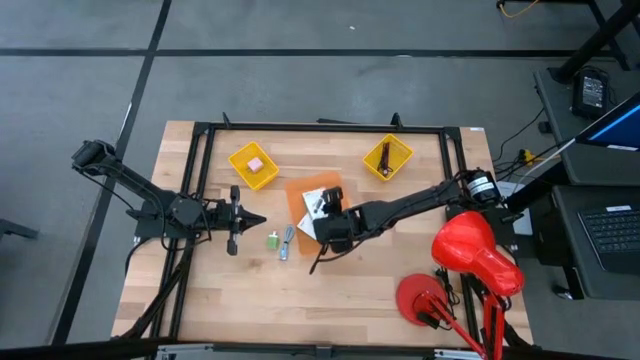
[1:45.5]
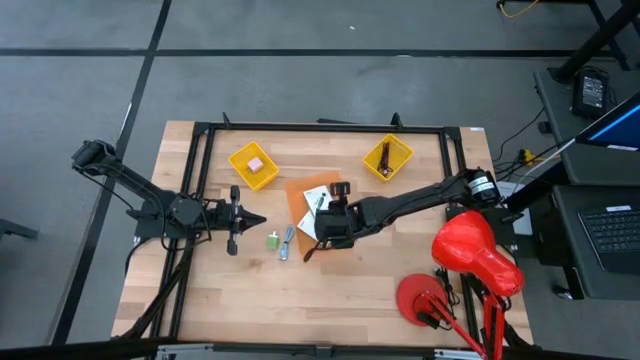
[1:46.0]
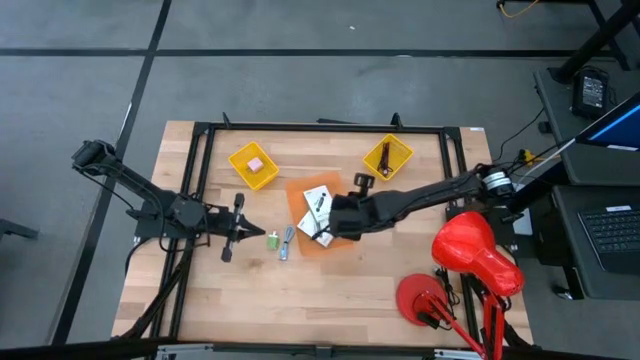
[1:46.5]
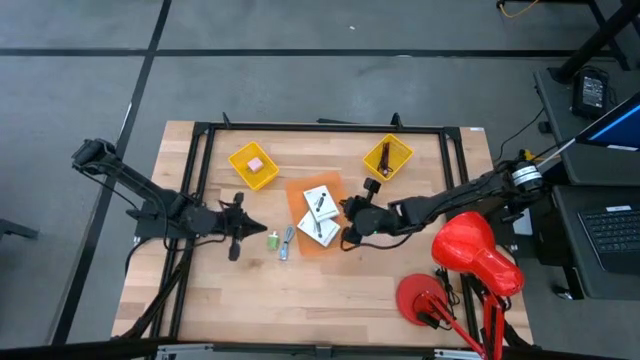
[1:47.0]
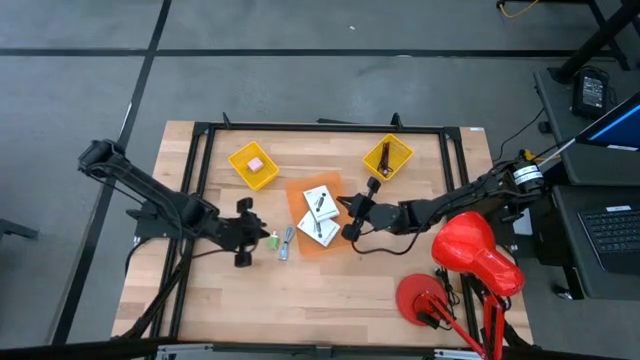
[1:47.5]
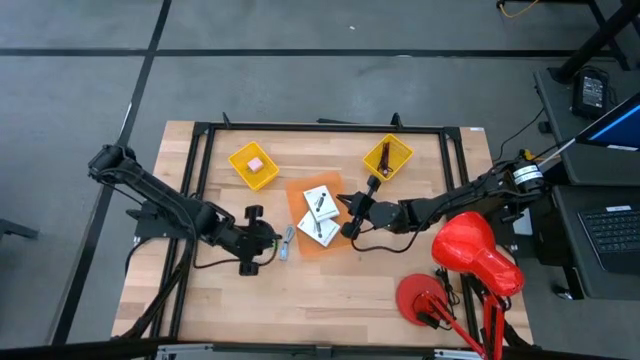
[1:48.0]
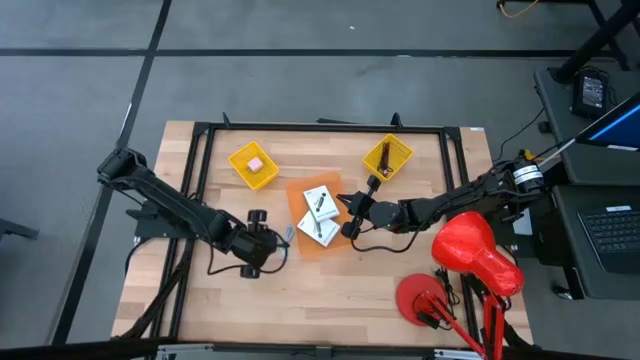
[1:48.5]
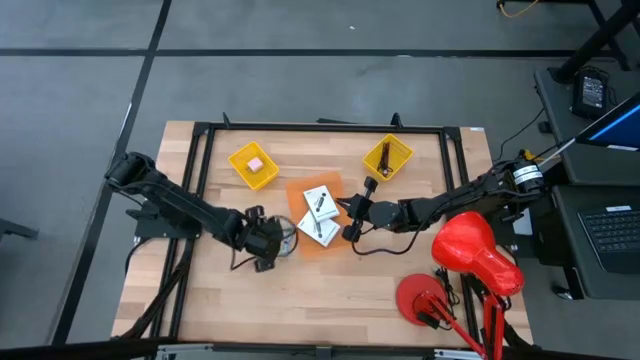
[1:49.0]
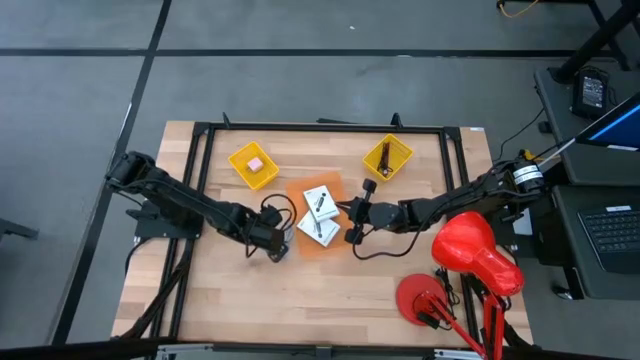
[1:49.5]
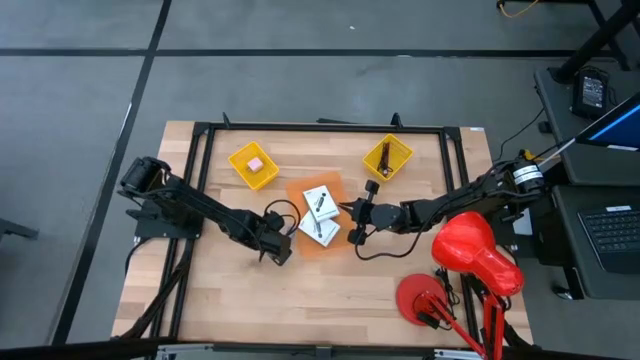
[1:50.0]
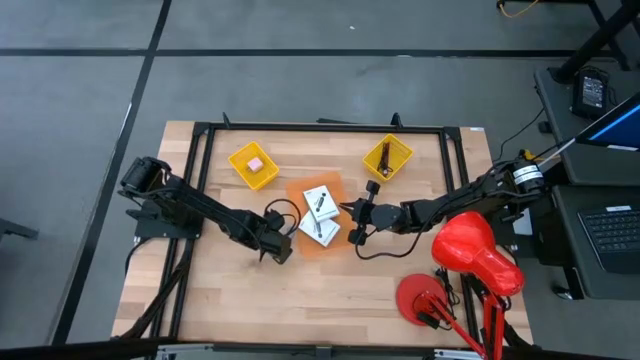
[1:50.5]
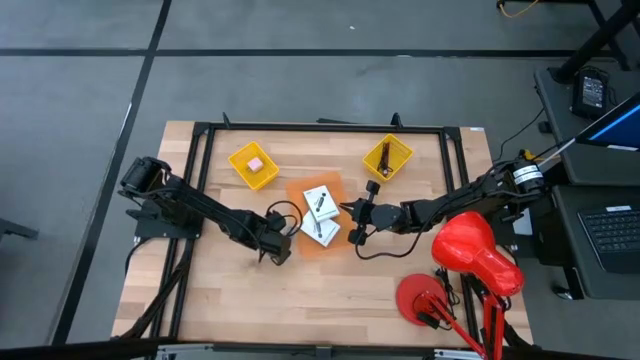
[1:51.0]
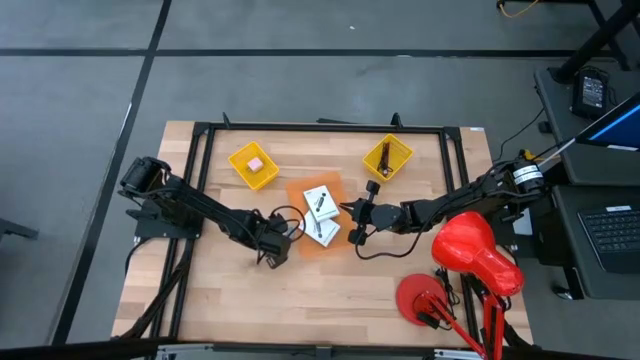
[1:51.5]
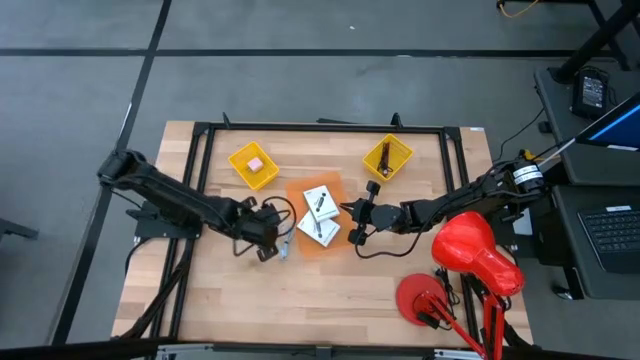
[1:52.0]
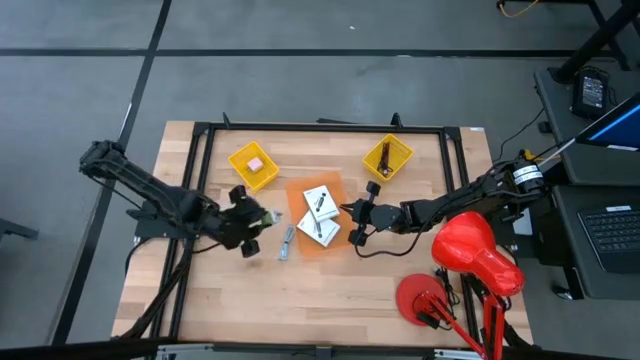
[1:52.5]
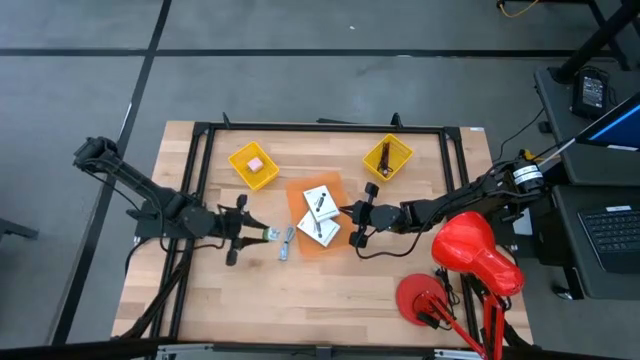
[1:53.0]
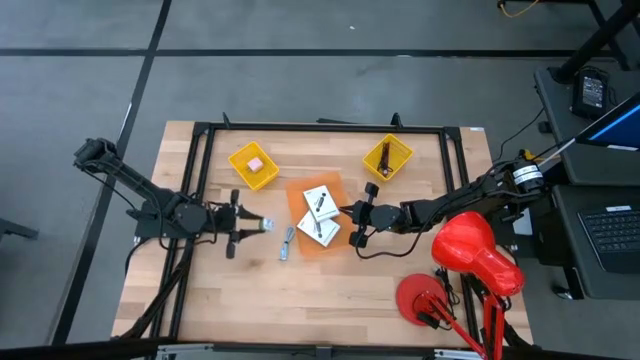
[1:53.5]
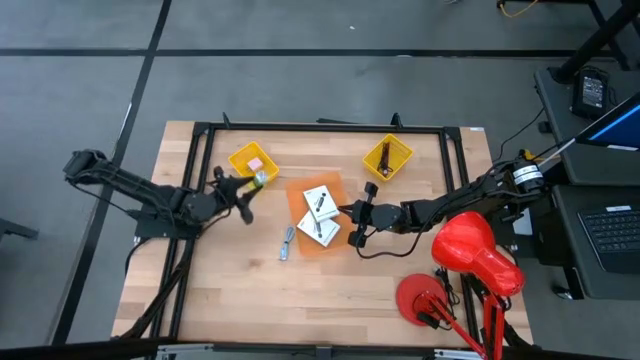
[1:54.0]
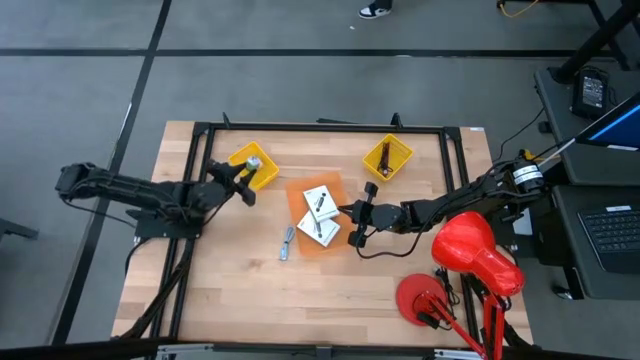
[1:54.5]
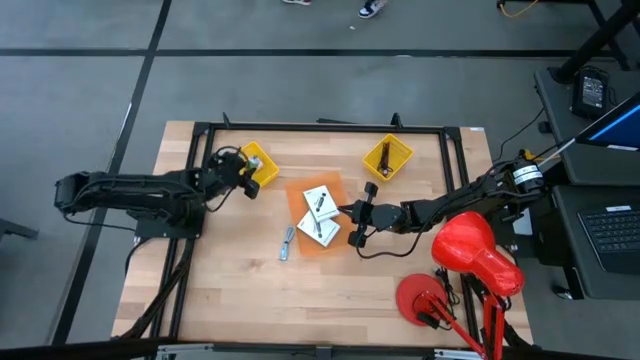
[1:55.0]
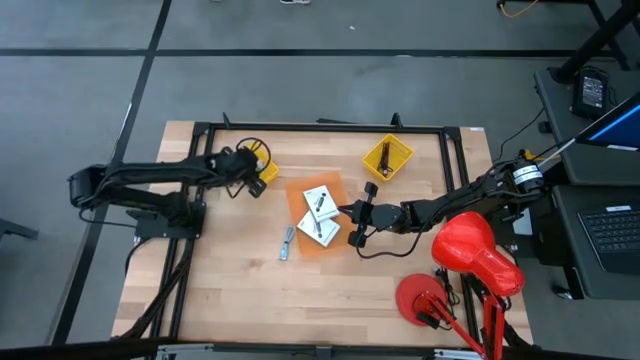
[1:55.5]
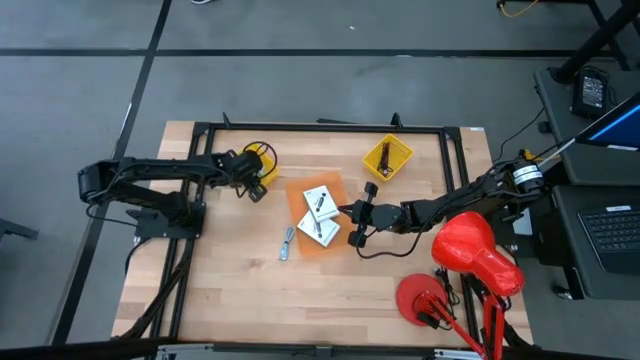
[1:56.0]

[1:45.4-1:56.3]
Task: Pick and place items into bin
Put the green charger adapter into the left yellow bin

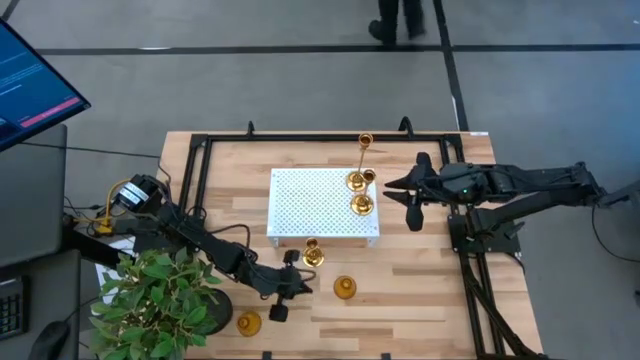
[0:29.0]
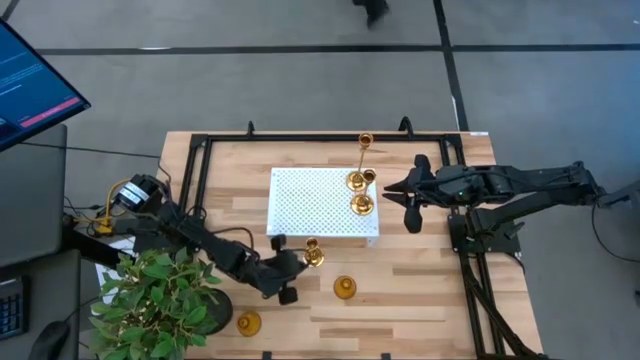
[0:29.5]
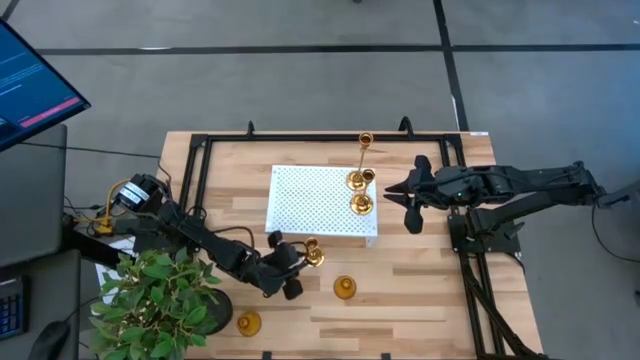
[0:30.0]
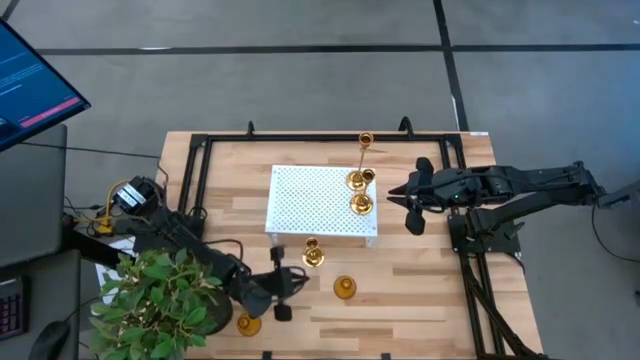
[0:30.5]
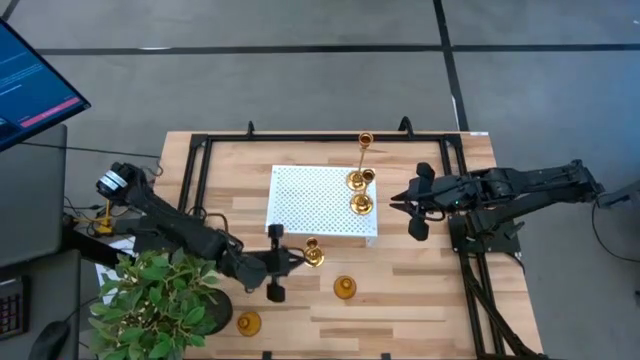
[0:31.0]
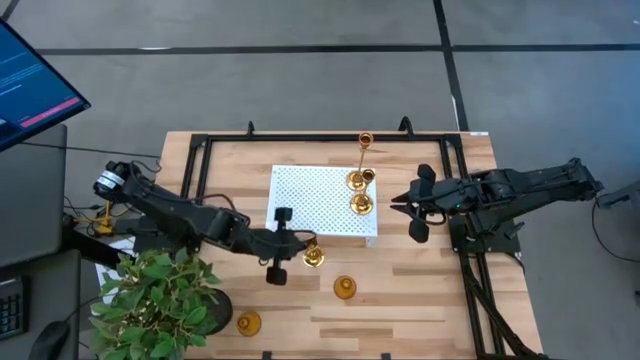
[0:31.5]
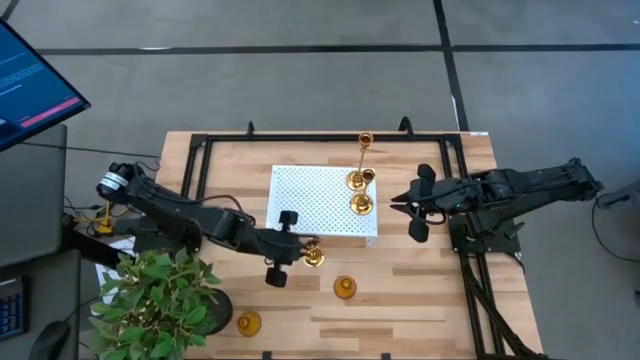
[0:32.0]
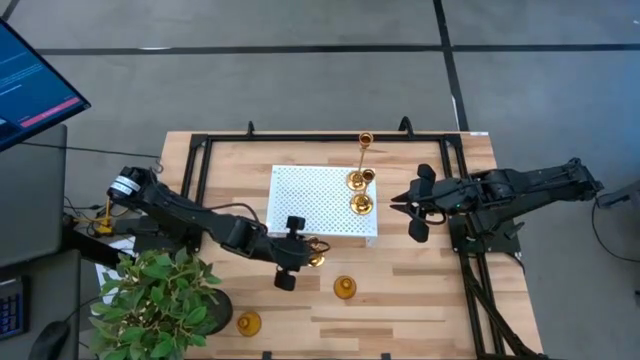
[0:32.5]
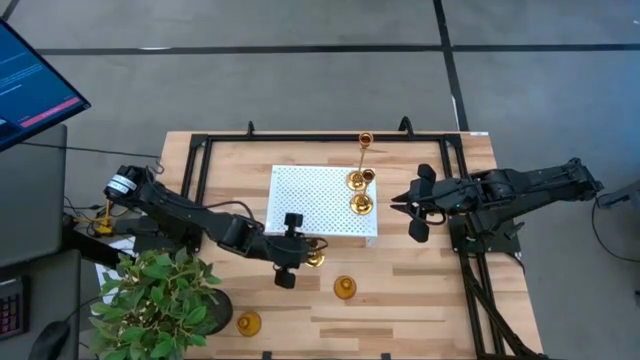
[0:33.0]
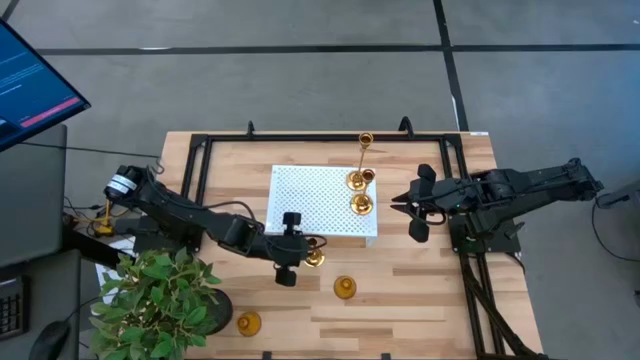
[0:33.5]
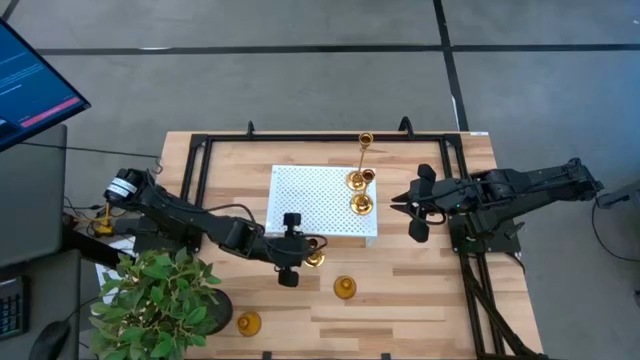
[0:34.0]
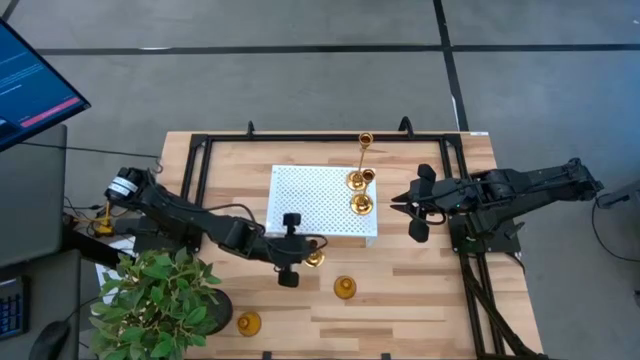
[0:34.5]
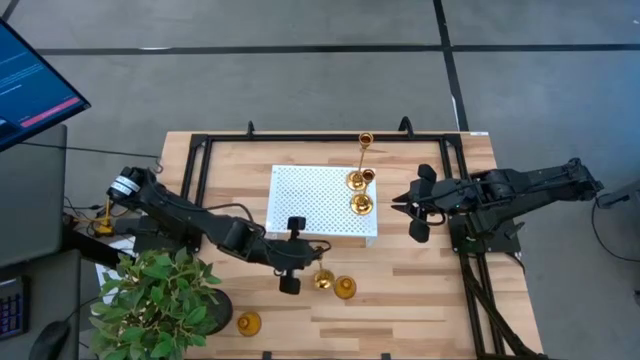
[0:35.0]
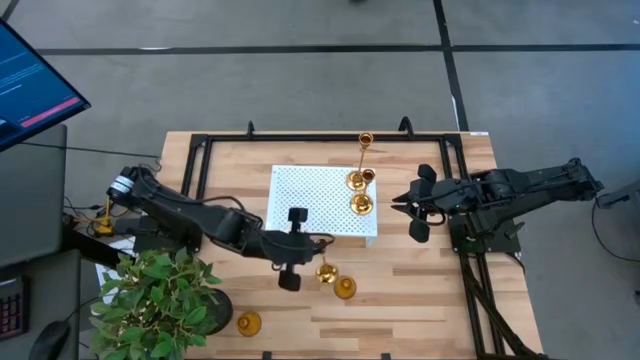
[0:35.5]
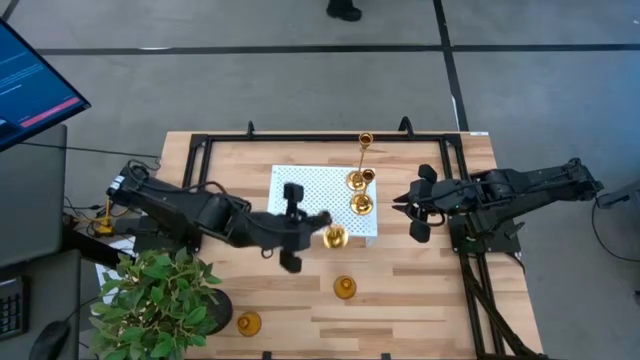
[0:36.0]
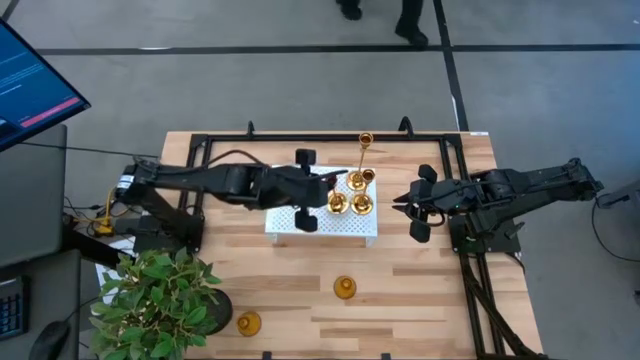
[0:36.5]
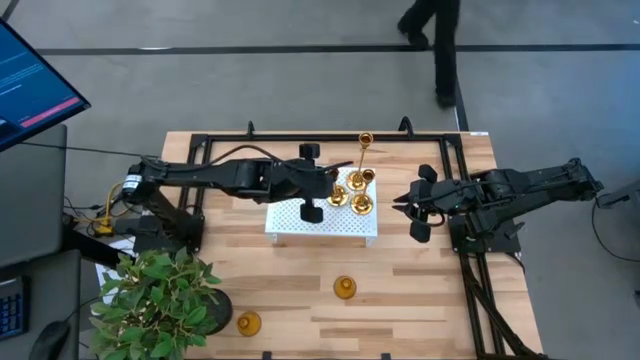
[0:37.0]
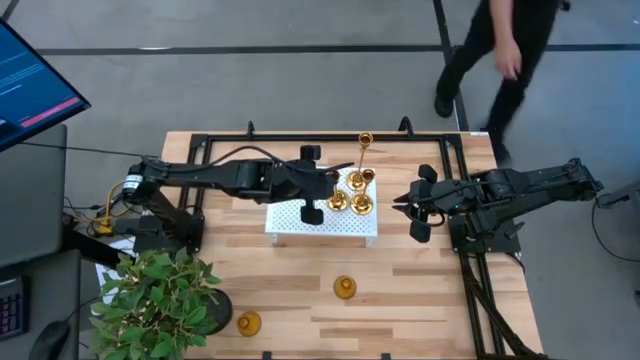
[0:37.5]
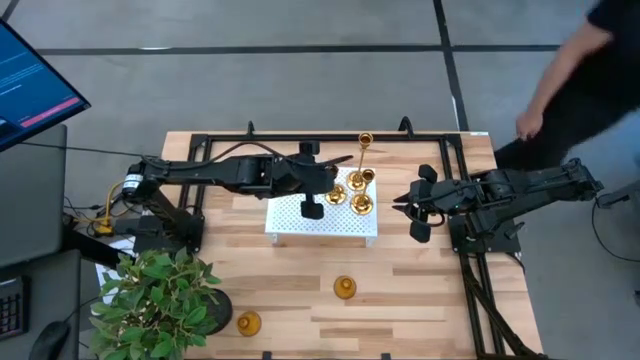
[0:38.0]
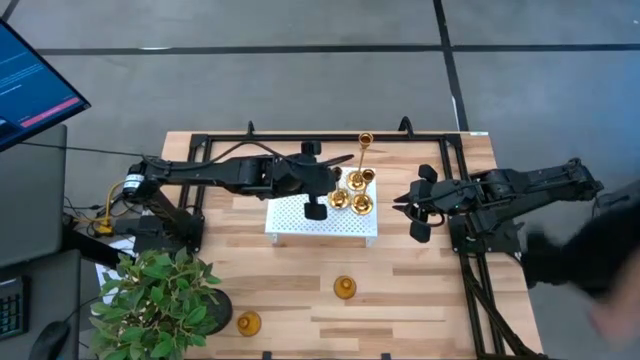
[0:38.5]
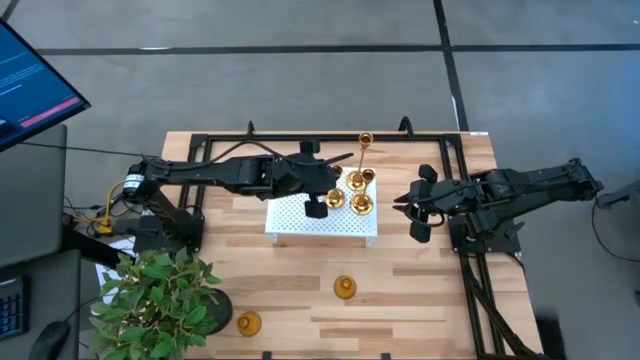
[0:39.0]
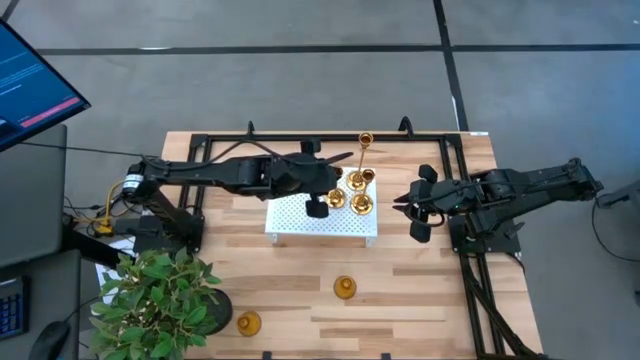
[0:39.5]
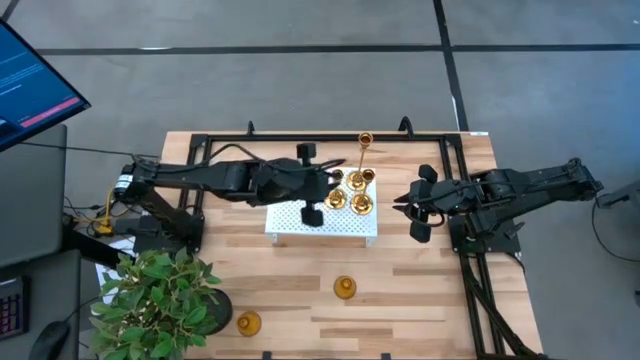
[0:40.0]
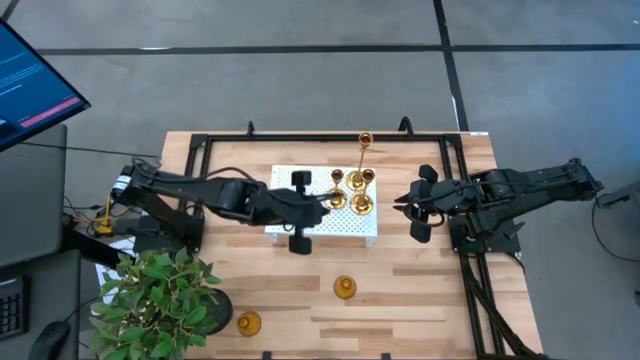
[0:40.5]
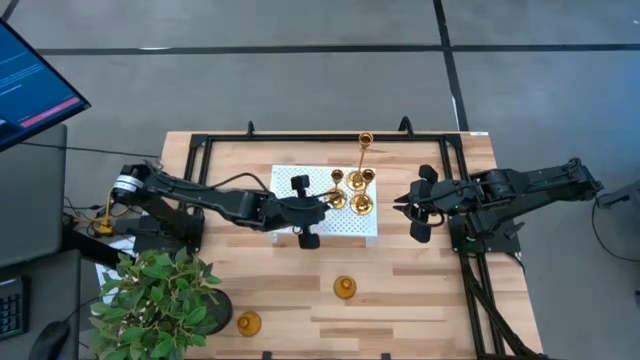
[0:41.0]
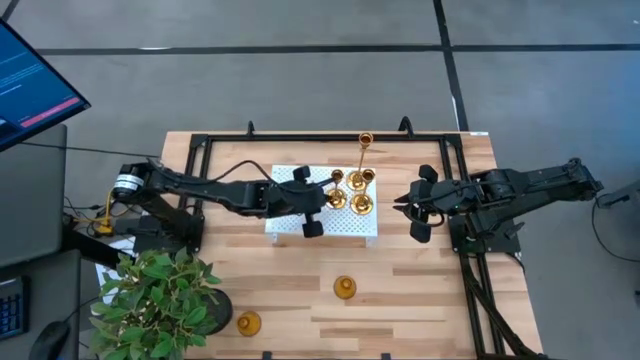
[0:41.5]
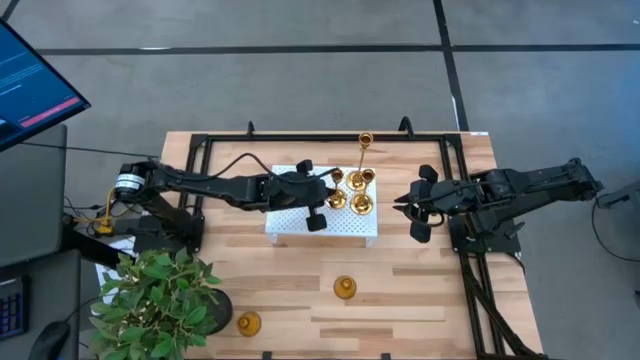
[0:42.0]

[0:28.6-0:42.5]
Task: Pick & Place candle stick holders
Put the golden candlestick holder on the shelf
